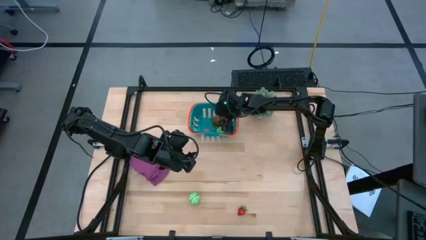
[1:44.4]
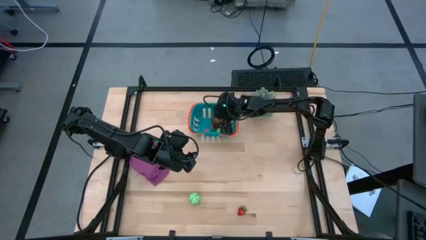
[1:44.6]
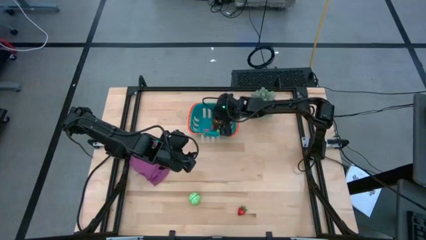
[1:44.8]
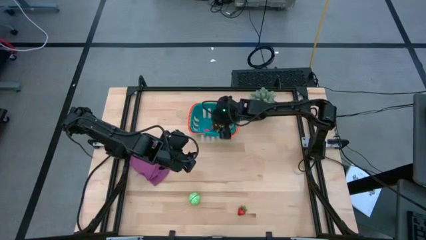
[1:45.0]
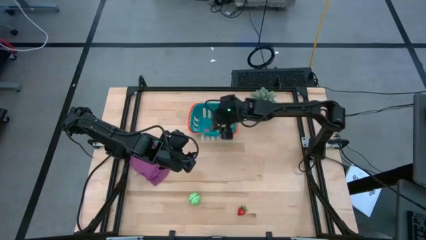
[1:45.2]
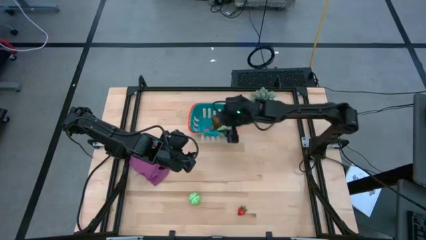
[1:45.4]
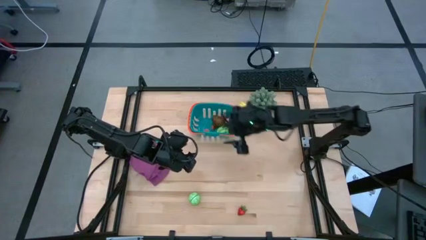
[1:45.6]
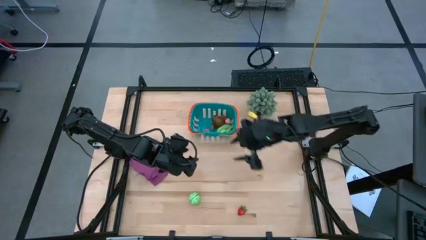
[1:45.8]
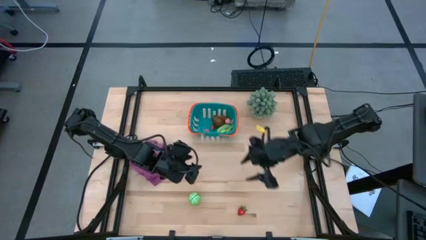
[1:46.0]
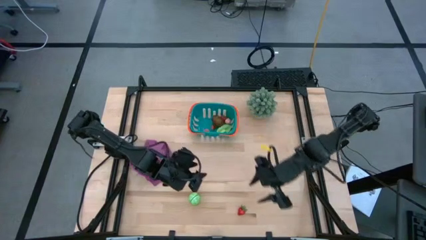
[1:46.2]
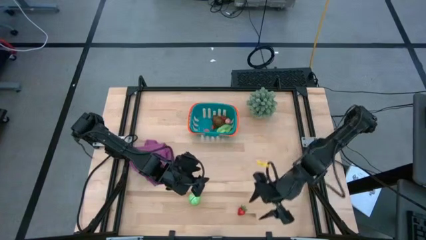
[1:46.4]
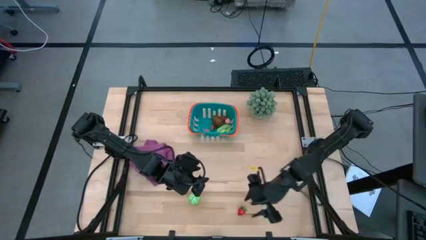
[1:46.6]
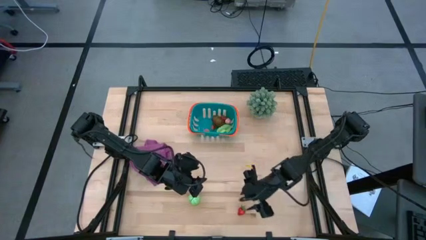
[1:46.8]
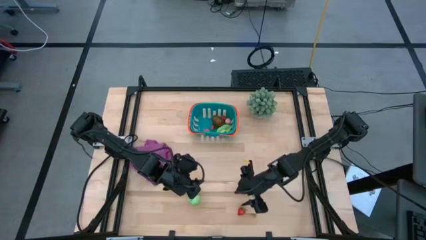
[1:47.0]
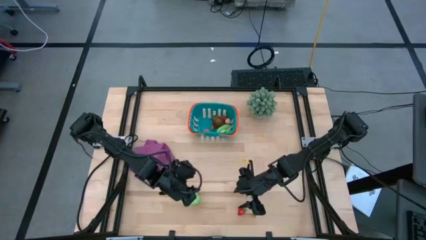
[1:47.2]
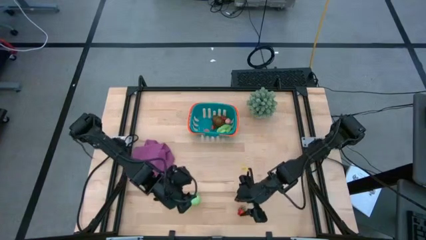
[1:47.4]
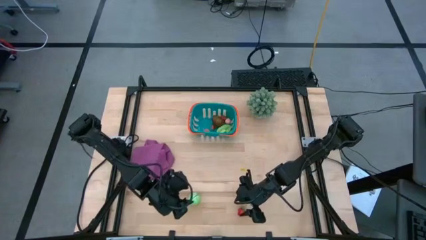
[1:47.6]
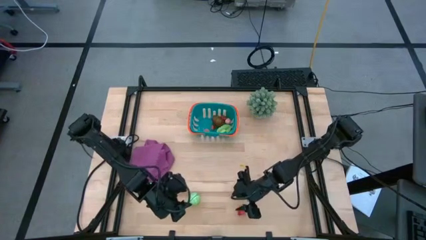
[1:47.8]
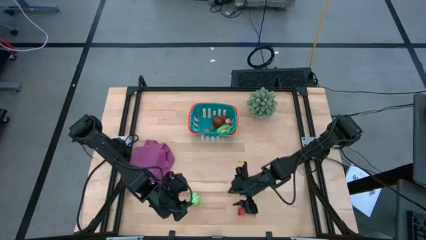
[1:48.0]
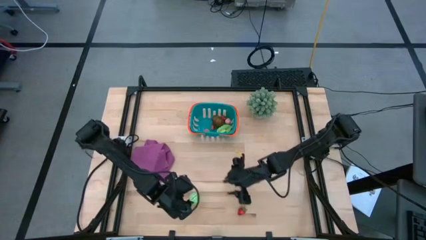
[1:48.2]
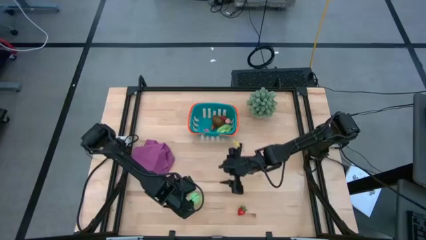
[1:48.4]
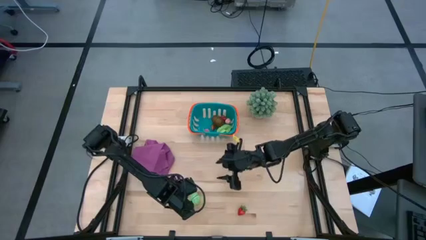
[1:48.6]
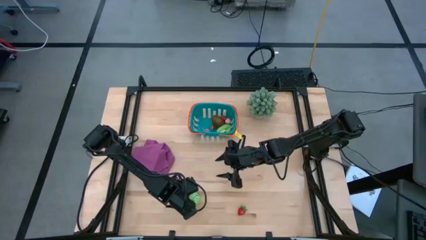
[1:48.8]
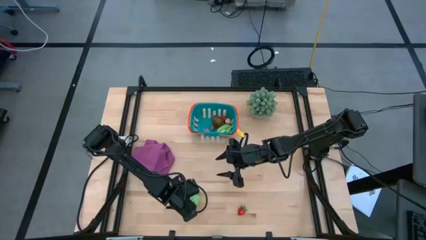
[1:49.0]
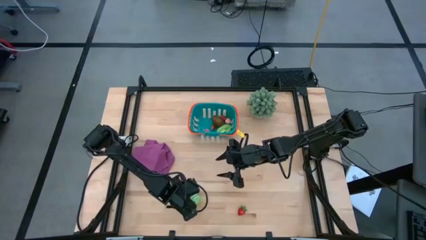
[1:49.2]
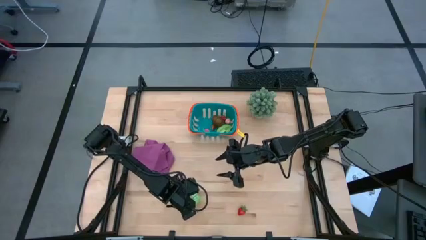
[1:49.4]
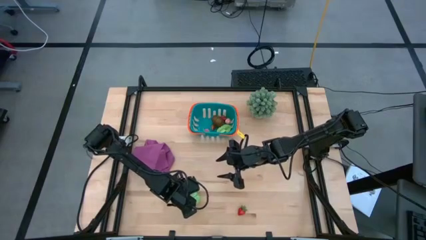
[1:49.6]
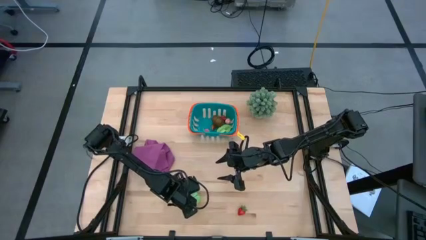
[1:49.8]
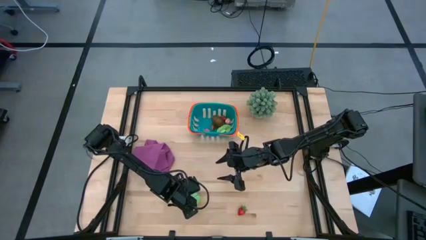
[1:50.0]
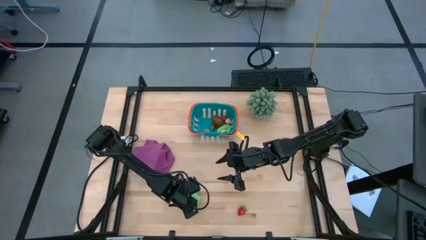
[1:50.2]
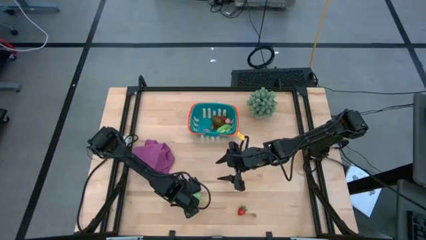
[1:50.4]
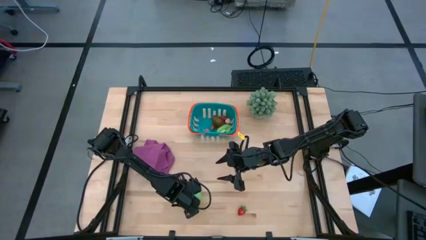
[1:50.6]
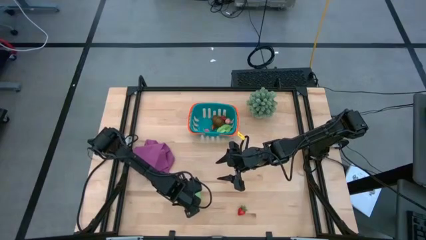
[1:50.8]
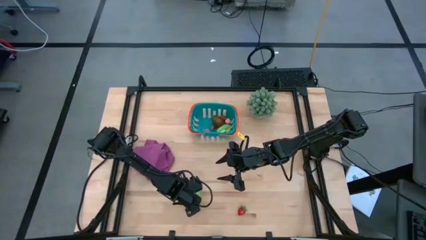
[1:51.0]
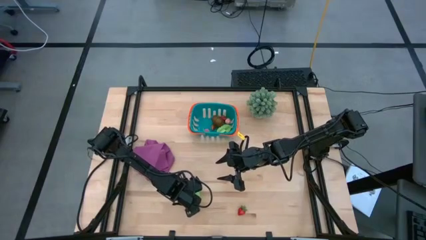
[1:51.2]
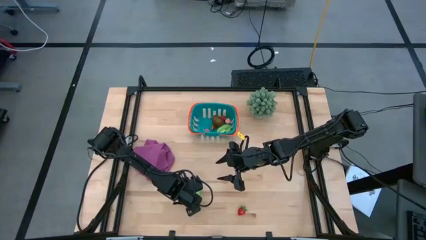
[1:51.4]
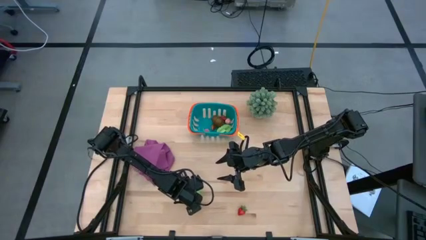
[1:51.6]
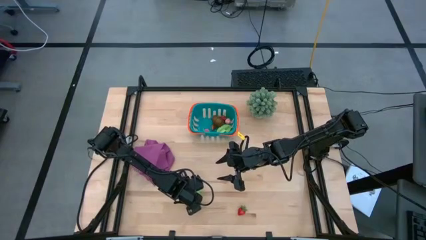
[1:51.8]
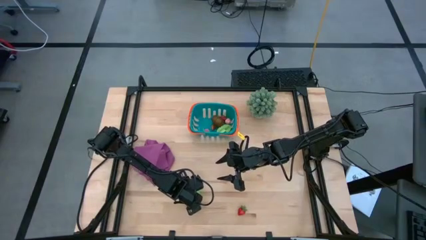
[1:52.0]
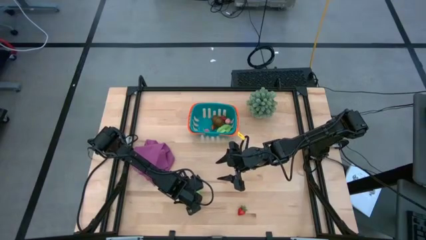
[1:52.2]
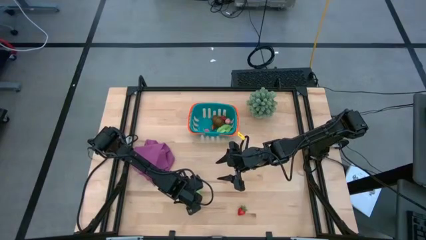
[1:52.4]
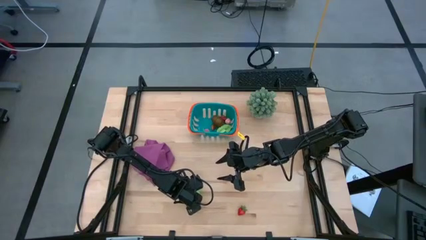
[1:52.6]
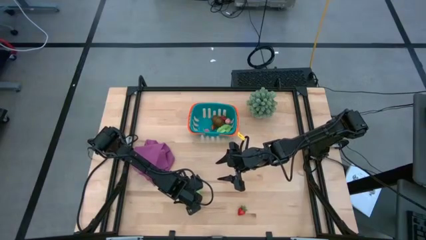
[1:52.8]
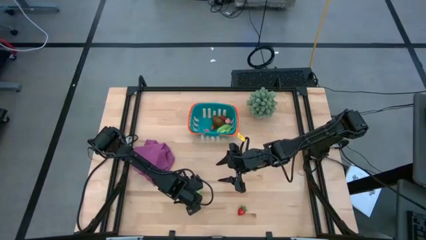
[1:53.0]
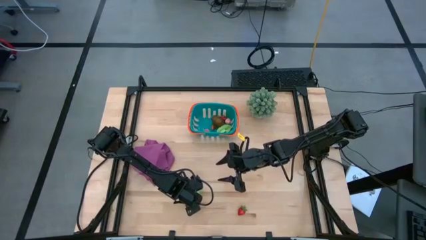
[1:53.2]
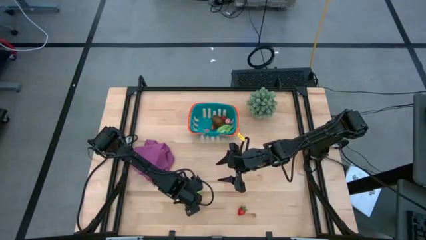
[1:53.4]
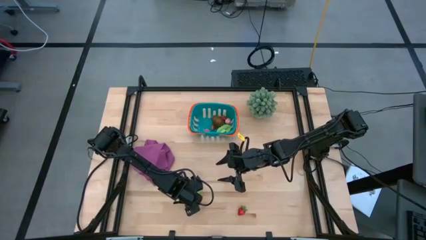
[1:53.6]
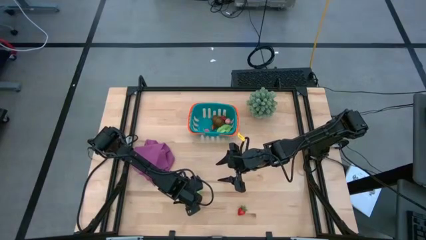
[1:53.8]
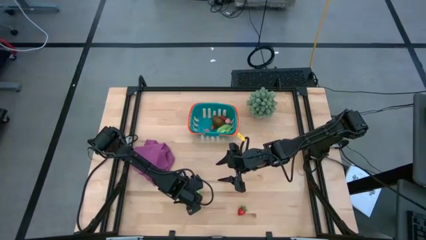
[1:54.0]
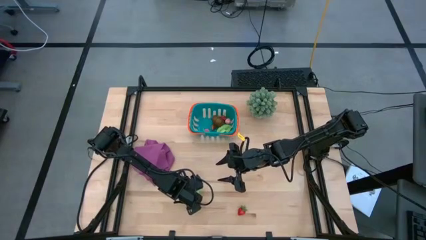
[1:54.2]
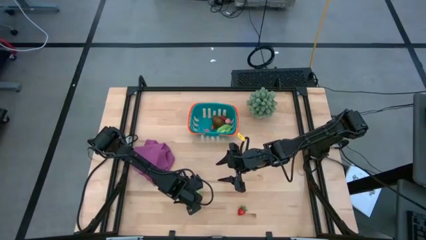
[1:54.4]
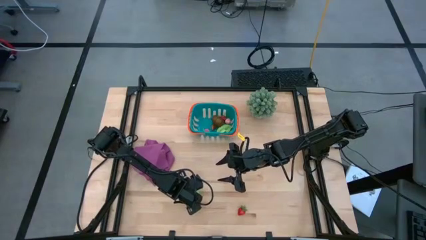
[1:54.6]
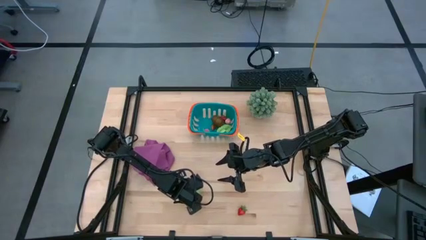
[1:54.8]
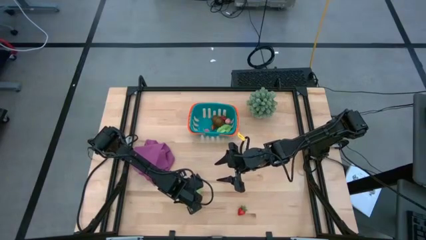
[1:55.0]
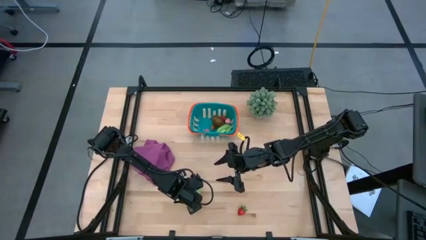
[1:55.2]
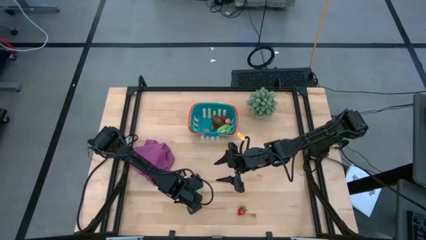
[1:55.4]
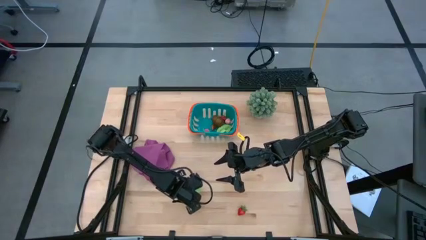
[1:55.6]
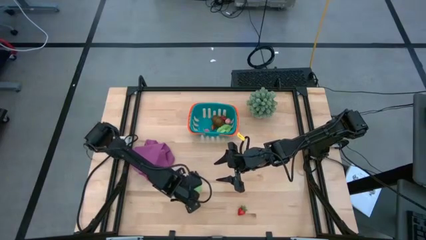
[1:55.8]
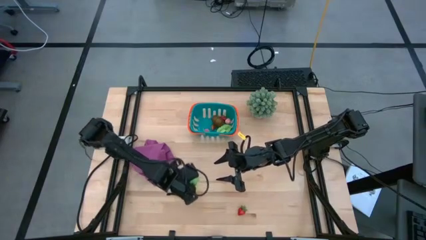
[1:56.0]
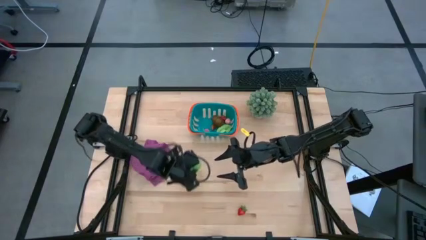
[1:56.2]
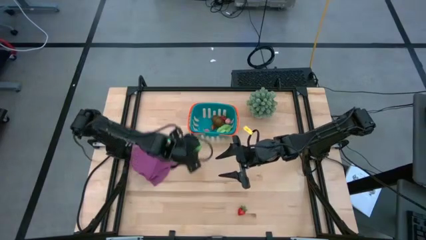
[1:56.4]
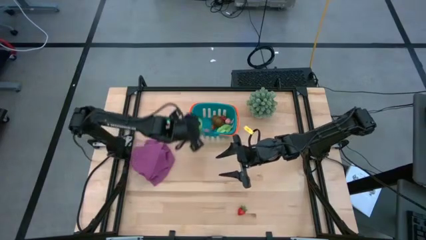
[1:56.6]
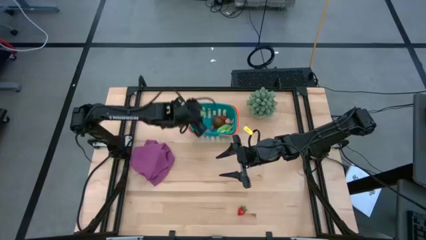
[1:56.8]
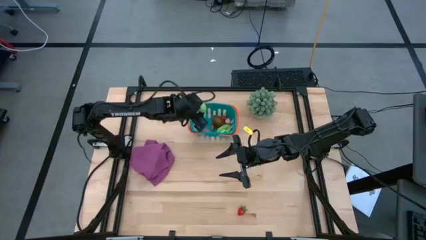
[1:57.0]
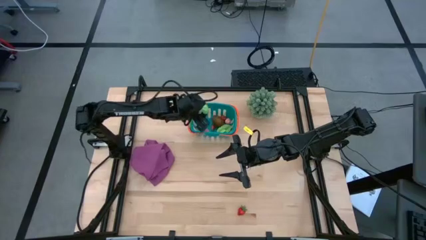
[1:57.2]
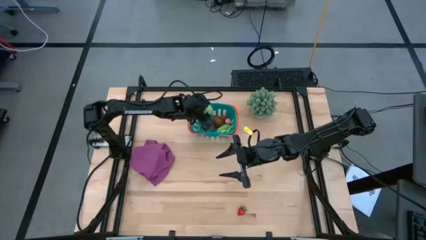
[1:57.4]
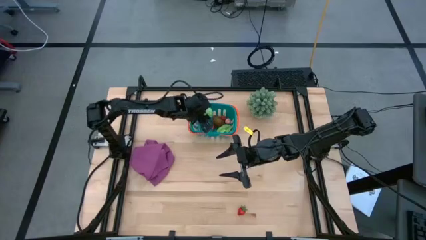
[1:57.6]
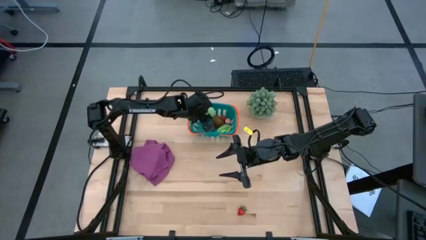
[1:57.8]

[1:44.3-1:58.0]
Task: Pick and placing Produce into tupperware
Put the green cabbage into the blue basket
